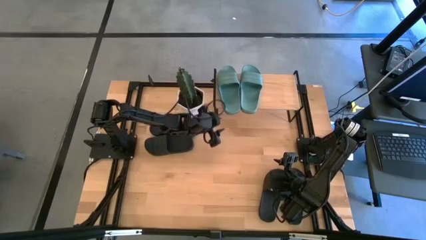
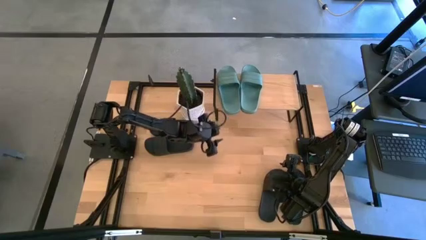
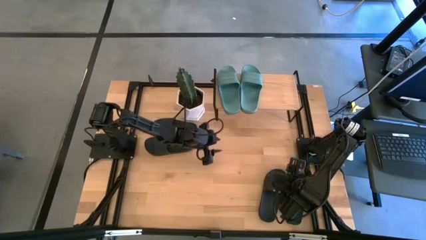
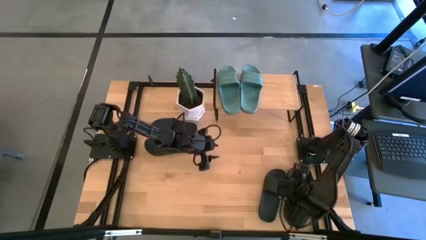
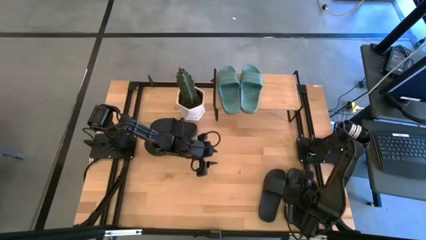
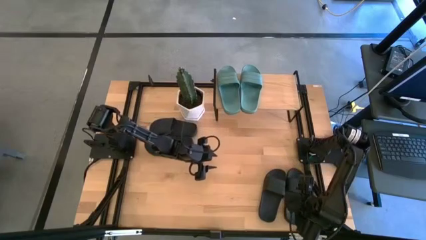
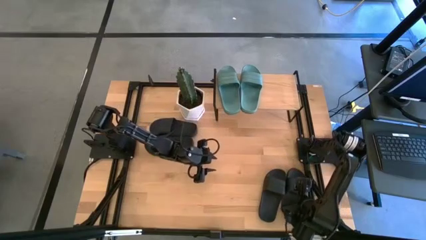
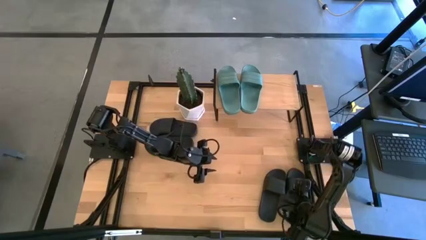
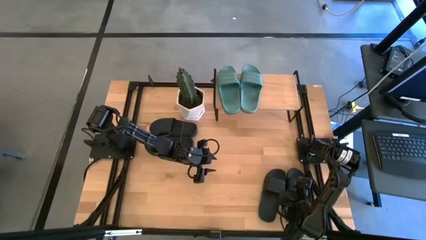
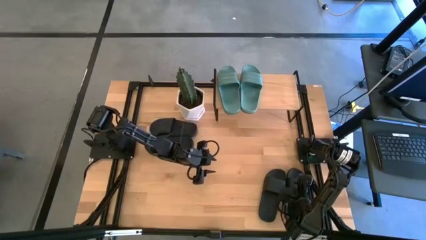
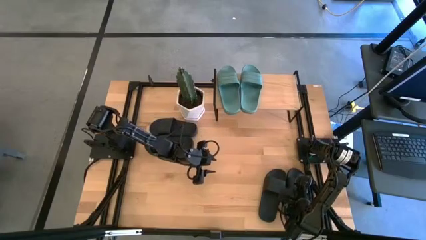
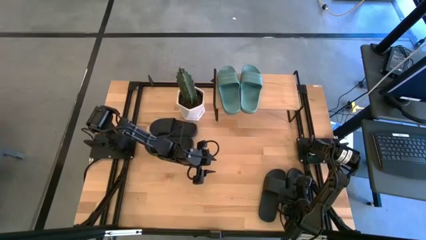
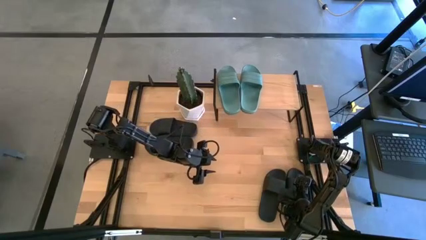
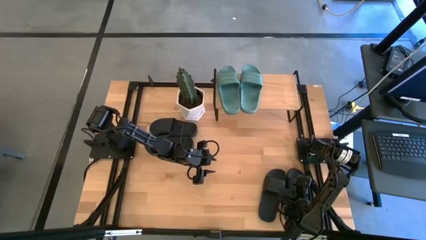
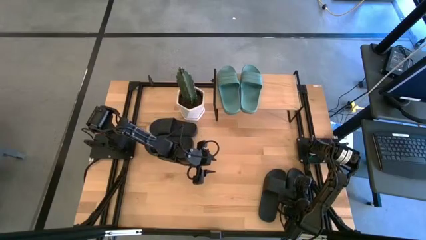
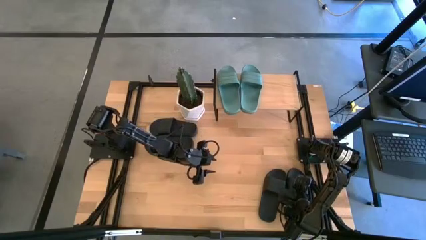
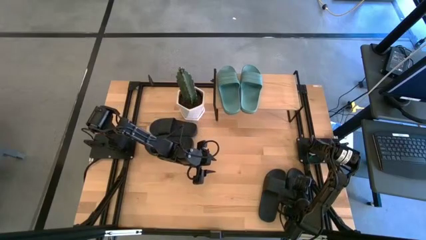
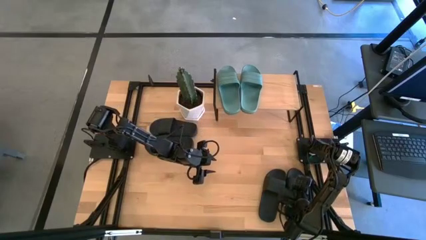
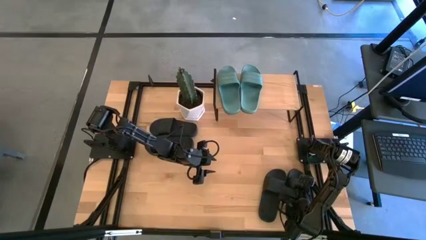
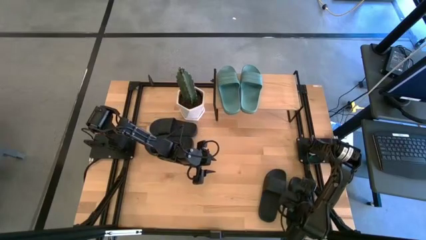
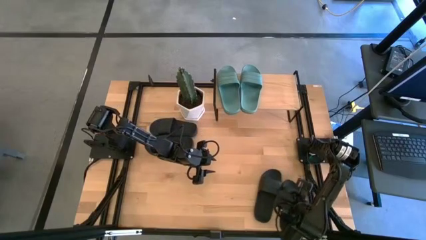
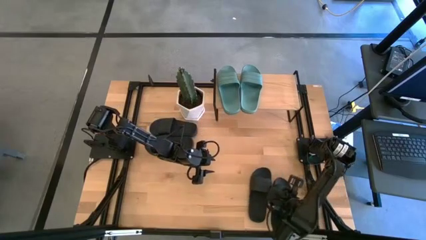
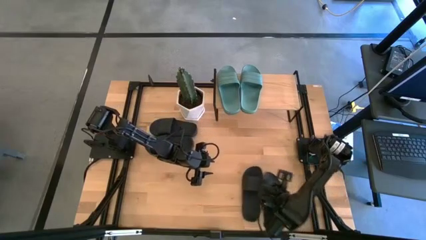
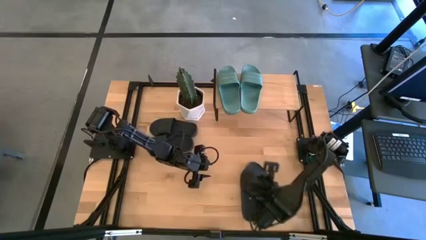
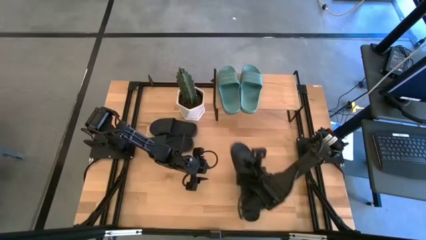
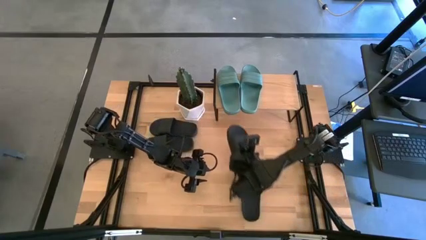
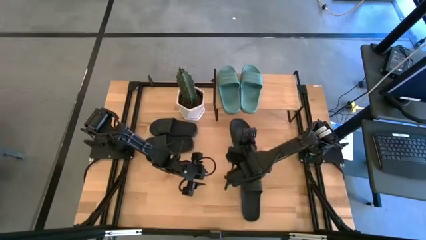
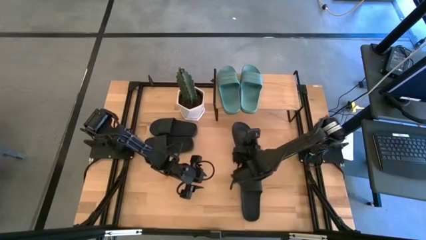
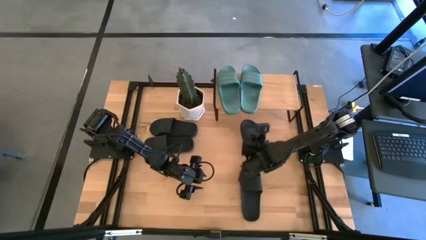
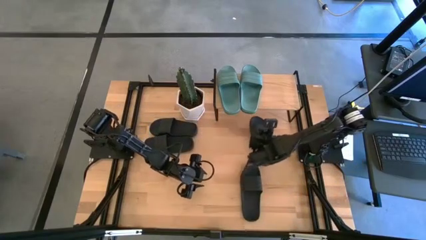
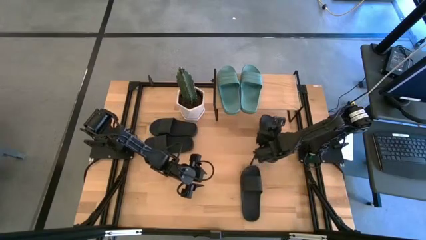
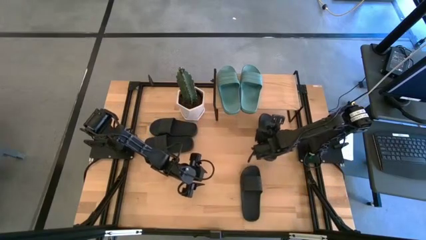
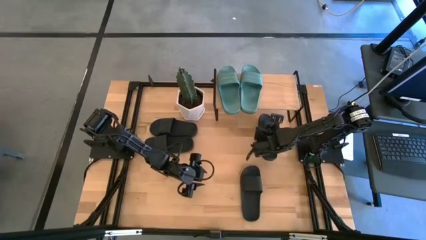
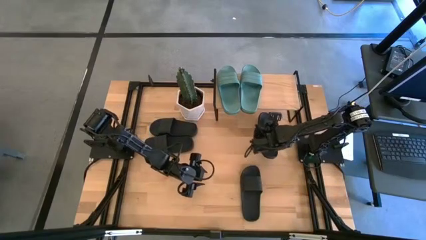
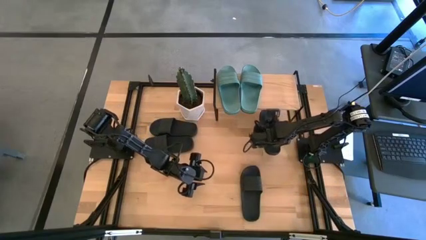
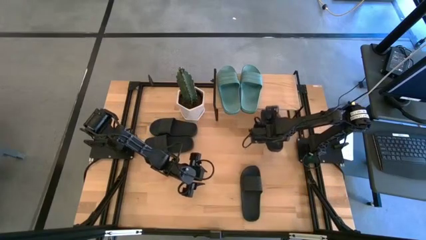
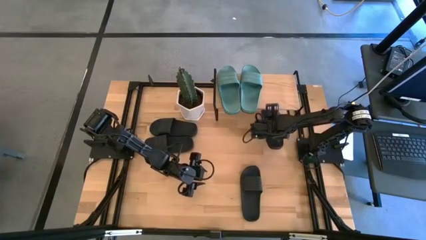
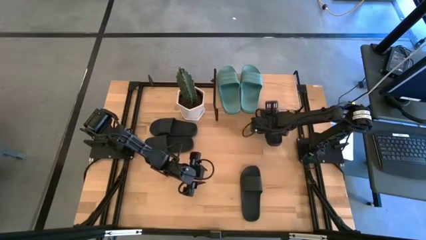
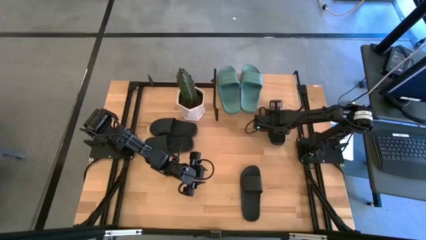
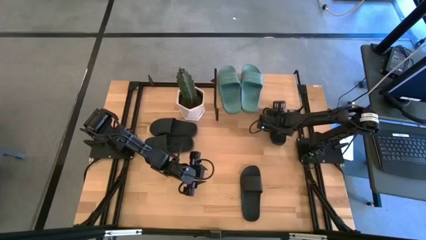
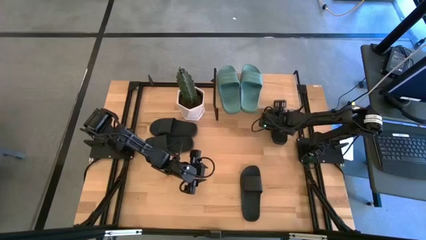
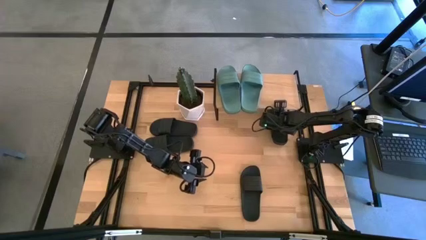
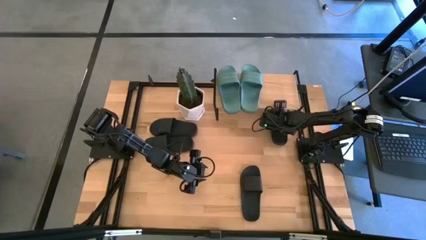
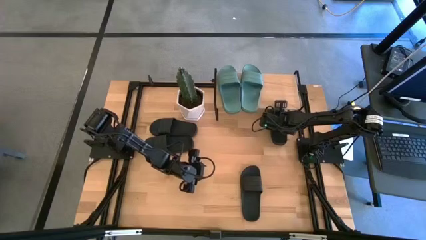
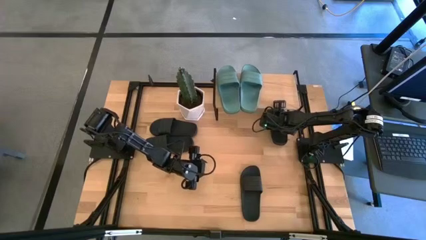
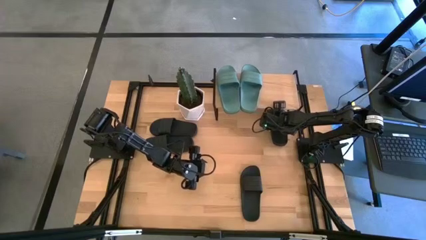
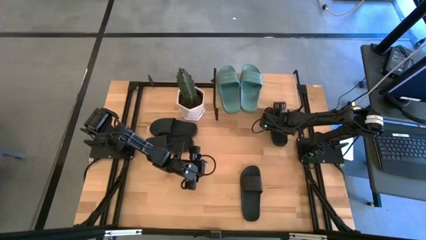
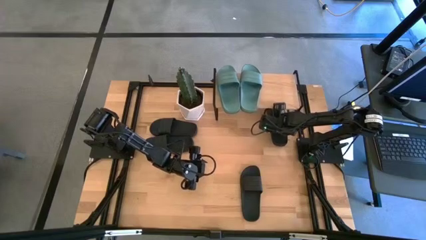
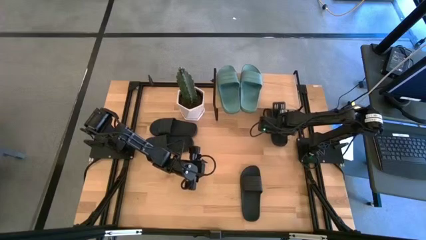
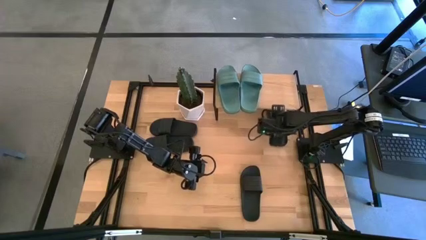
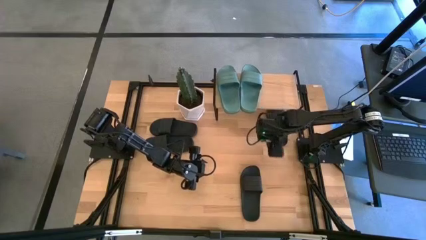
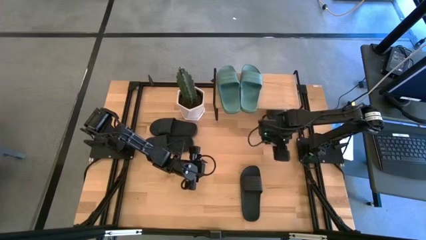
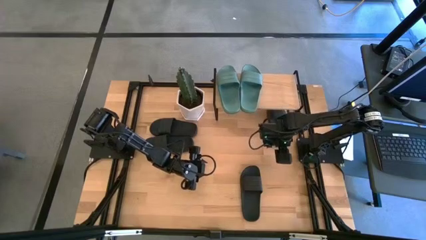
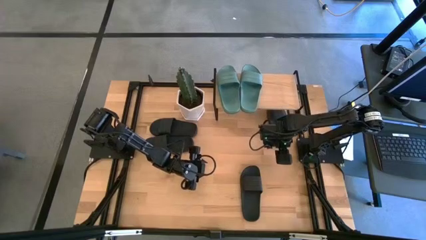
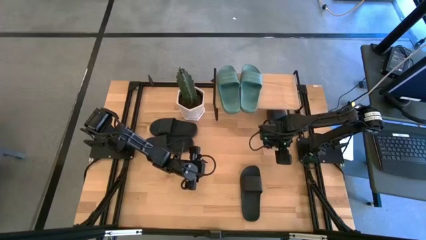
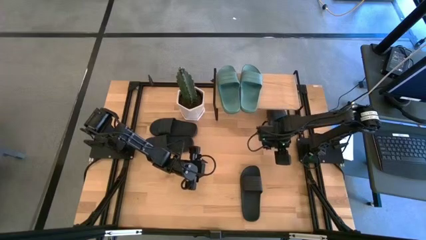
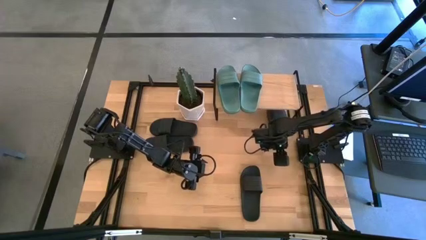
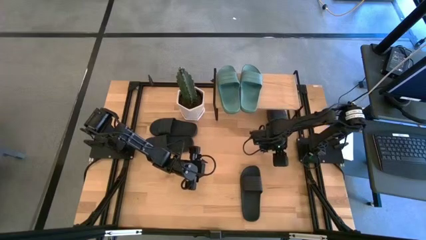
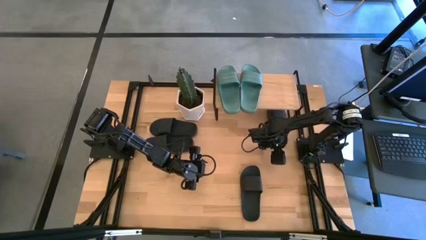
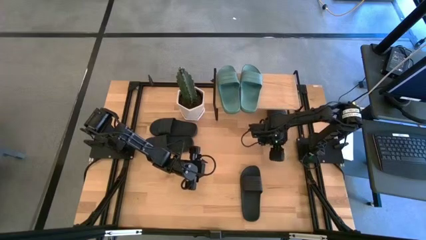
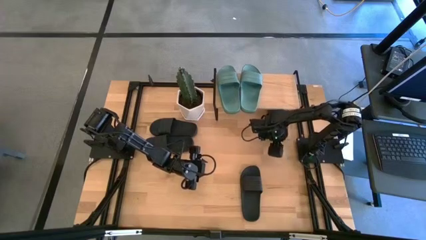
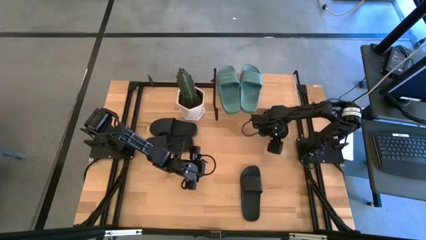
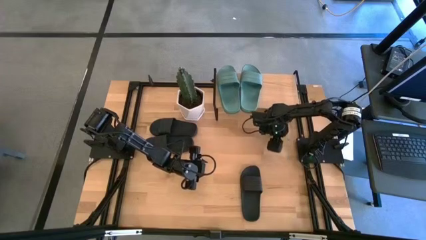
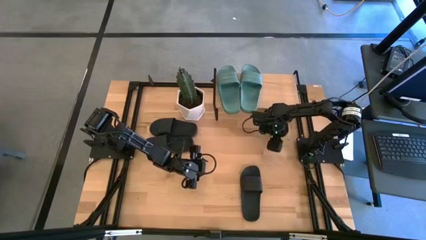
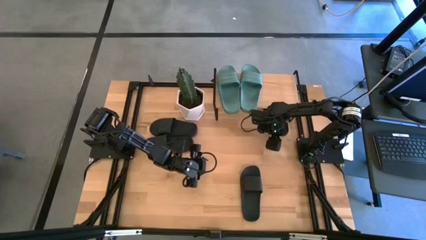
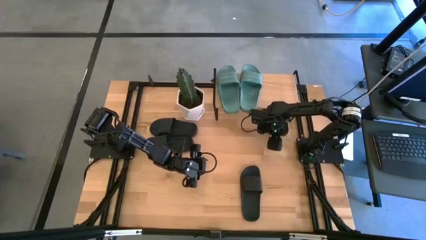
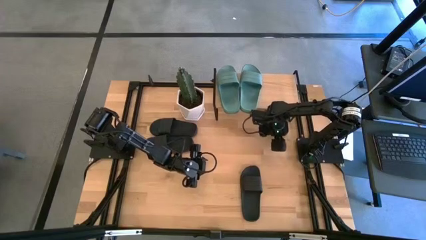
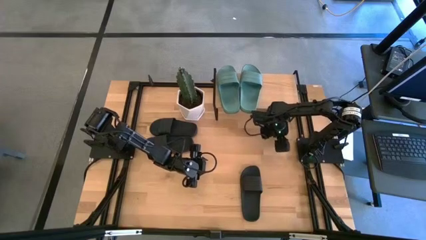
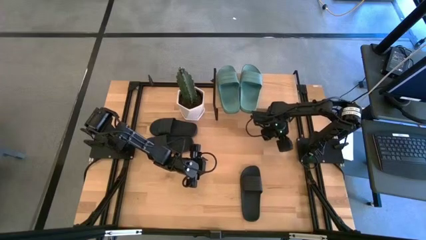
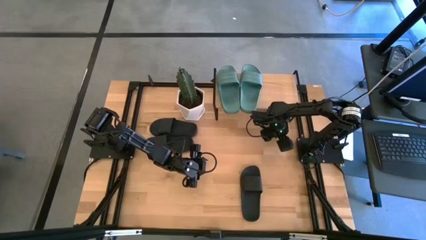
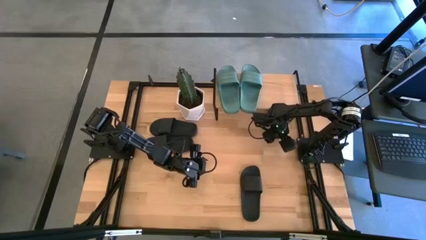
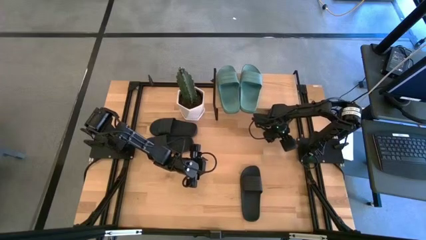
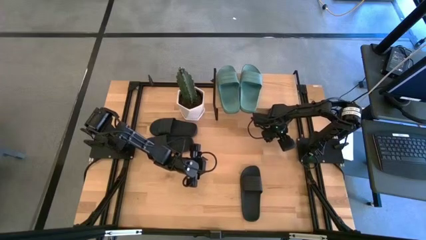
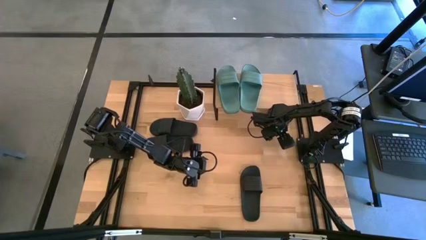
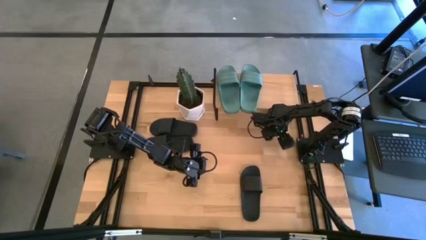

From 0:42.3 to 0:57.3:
Task: Pick and place slides into the shelf
Put the black slipper under the shelf
